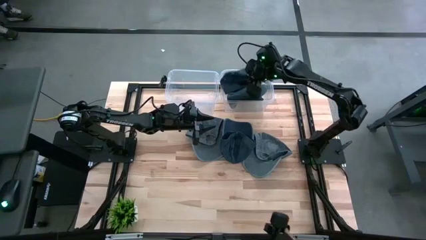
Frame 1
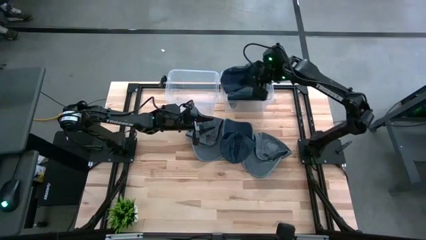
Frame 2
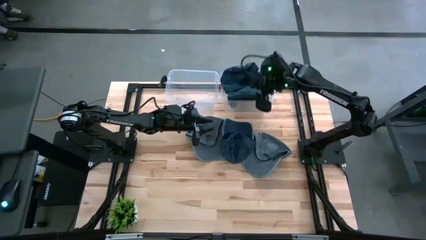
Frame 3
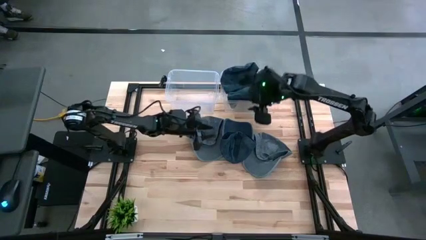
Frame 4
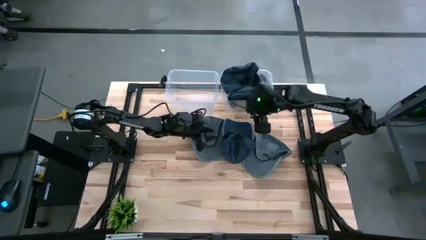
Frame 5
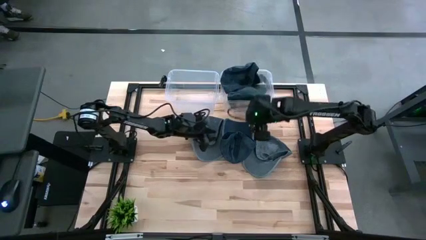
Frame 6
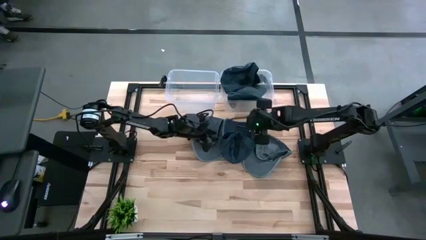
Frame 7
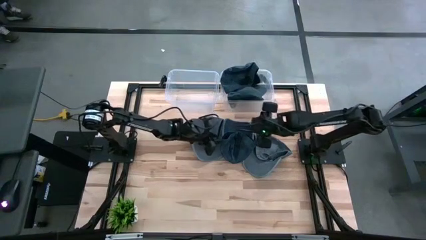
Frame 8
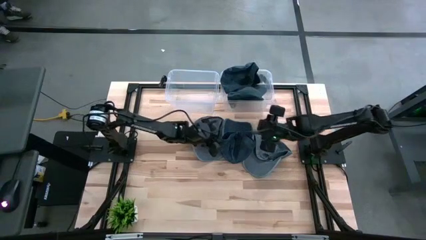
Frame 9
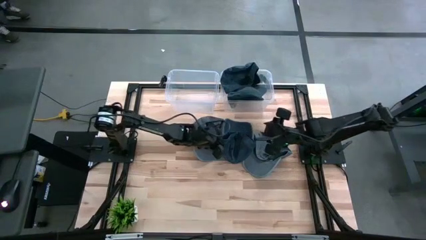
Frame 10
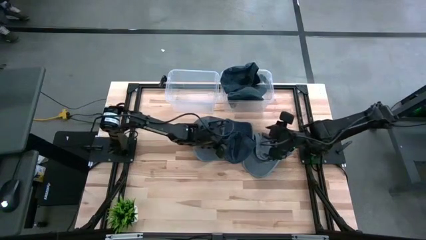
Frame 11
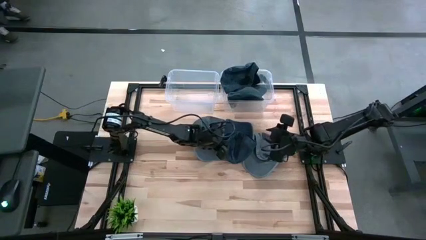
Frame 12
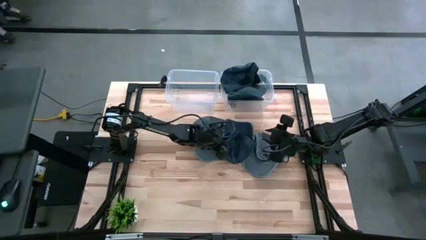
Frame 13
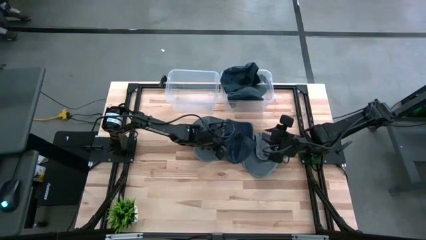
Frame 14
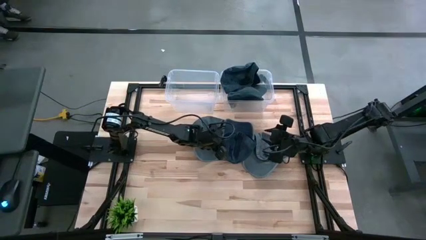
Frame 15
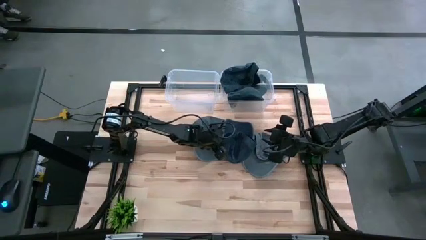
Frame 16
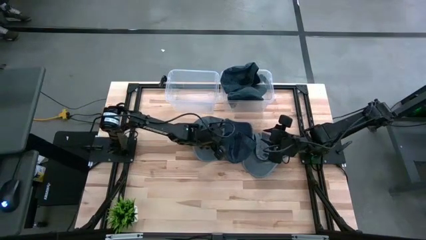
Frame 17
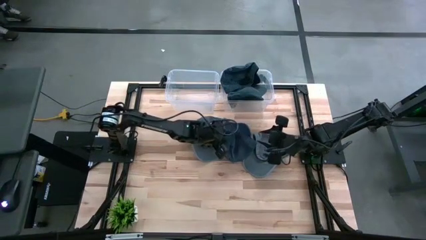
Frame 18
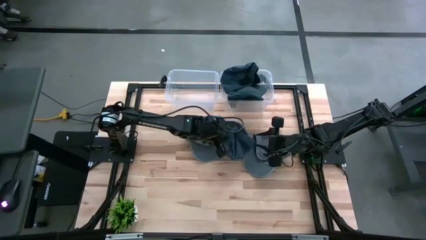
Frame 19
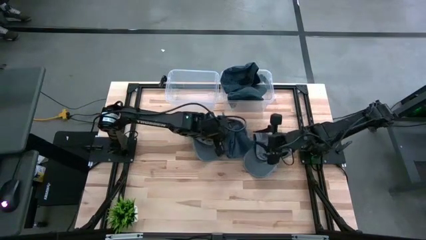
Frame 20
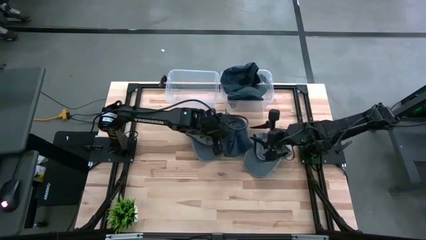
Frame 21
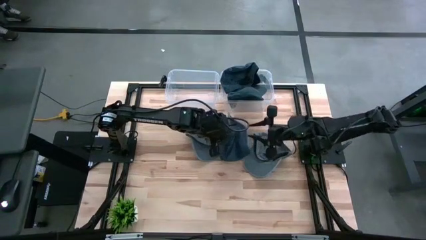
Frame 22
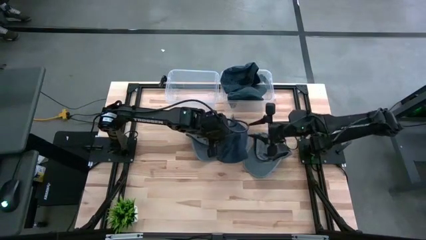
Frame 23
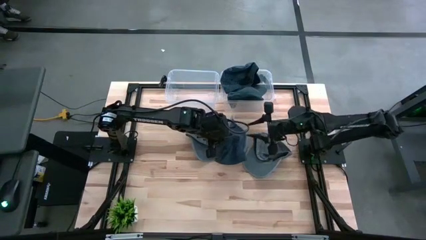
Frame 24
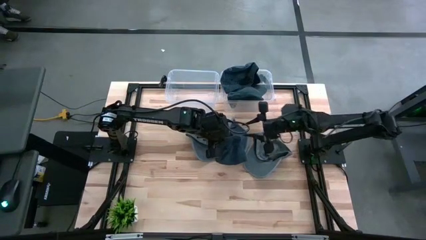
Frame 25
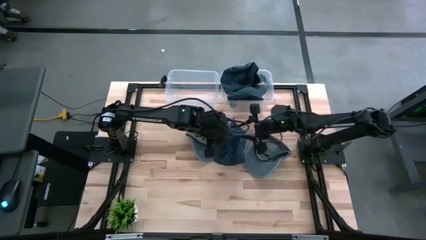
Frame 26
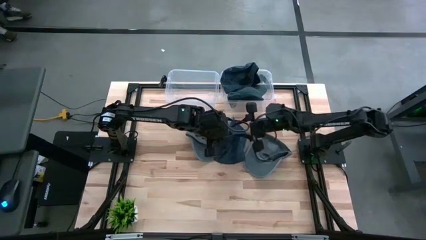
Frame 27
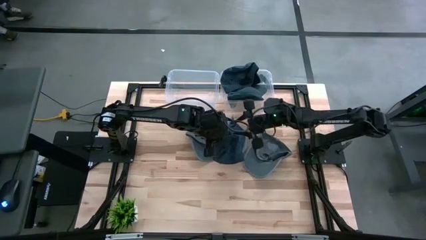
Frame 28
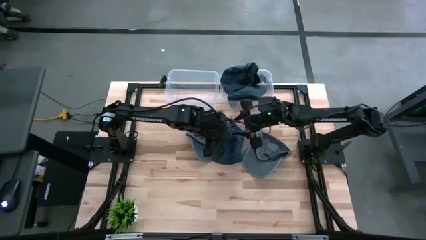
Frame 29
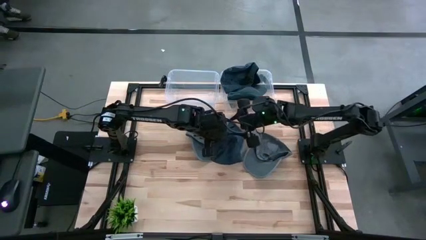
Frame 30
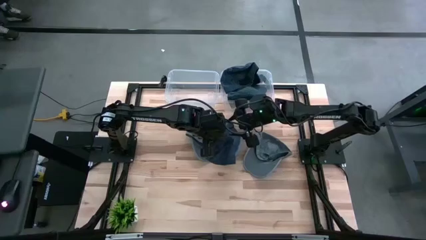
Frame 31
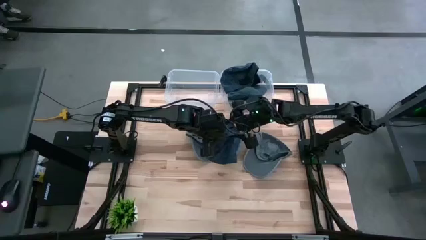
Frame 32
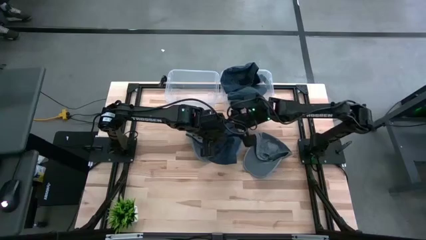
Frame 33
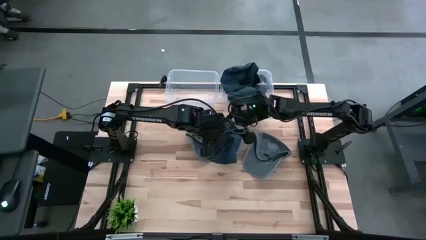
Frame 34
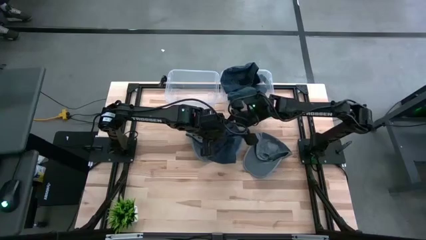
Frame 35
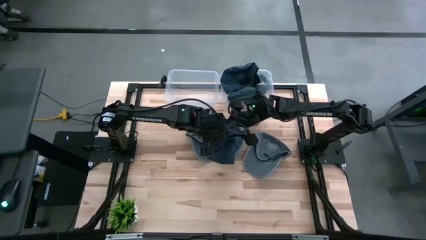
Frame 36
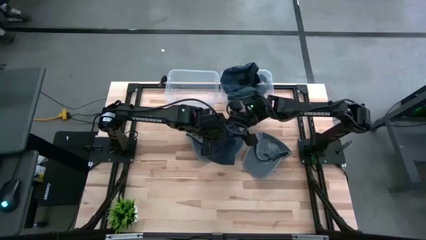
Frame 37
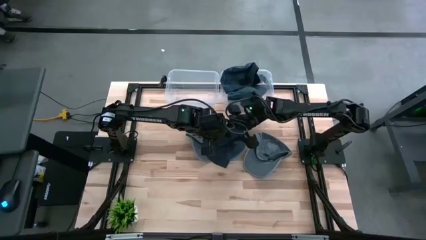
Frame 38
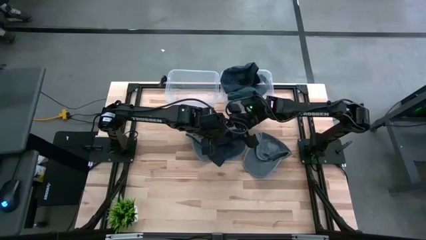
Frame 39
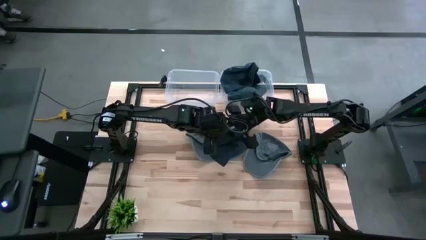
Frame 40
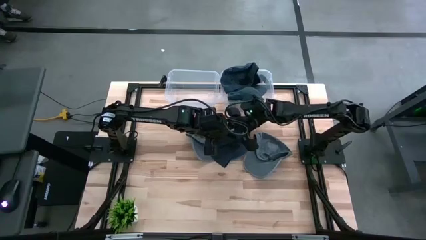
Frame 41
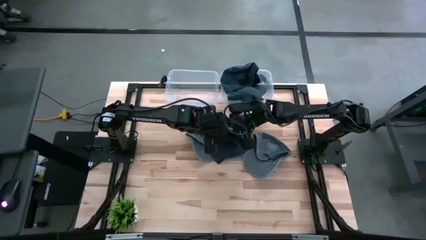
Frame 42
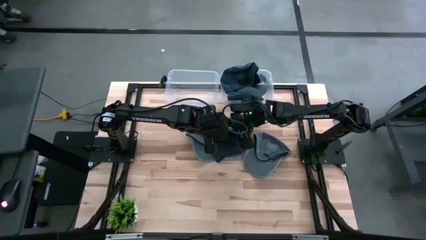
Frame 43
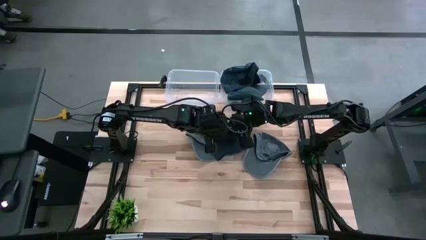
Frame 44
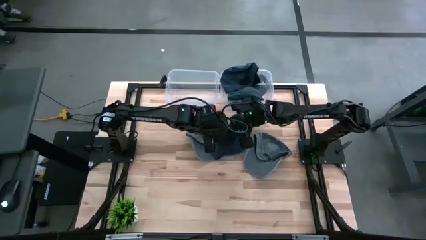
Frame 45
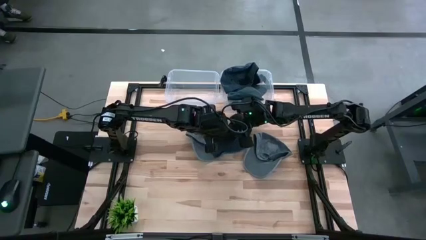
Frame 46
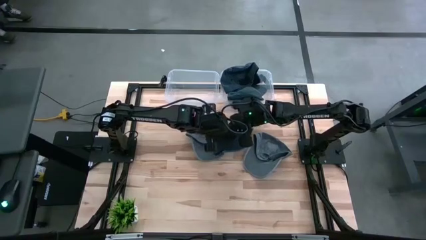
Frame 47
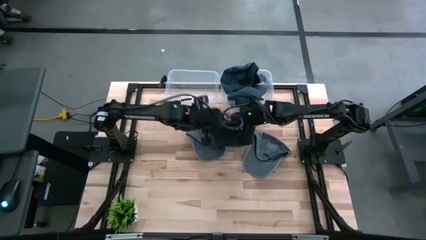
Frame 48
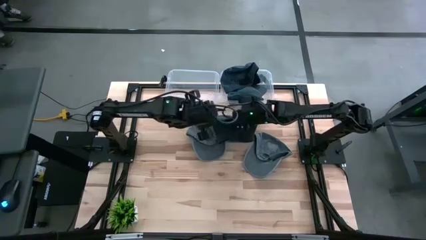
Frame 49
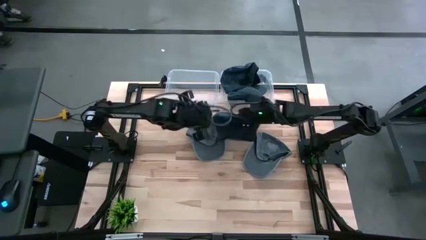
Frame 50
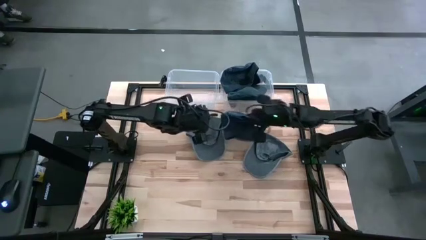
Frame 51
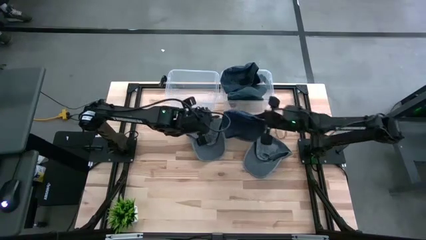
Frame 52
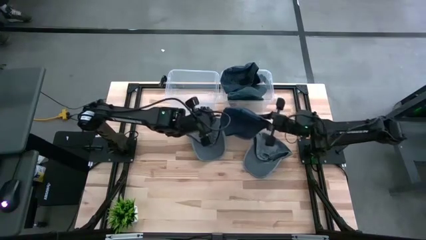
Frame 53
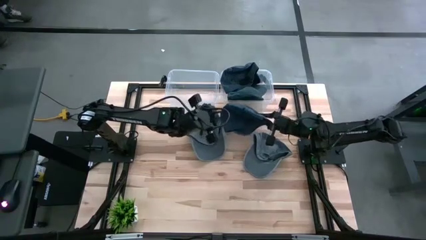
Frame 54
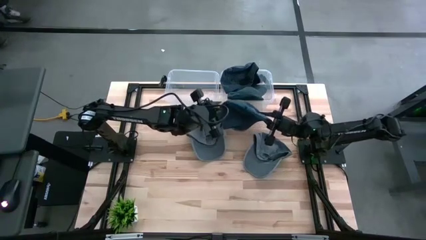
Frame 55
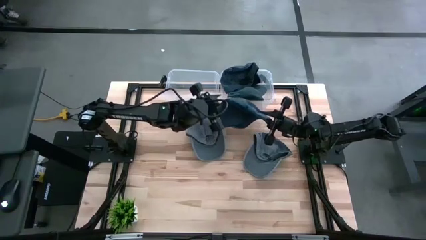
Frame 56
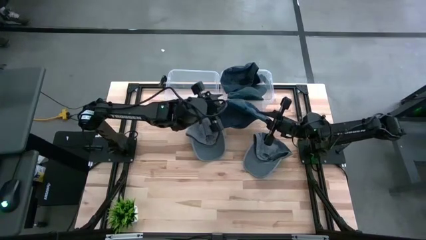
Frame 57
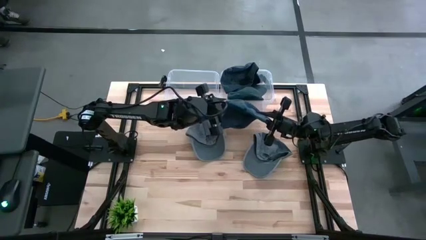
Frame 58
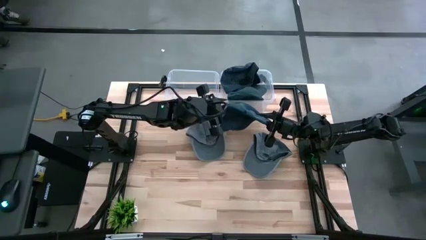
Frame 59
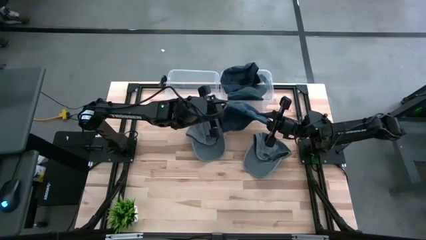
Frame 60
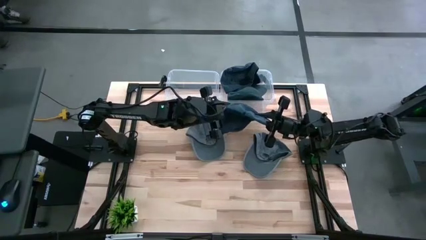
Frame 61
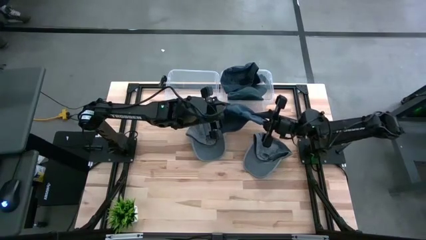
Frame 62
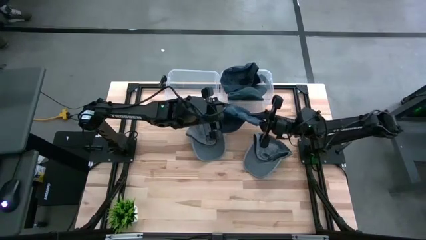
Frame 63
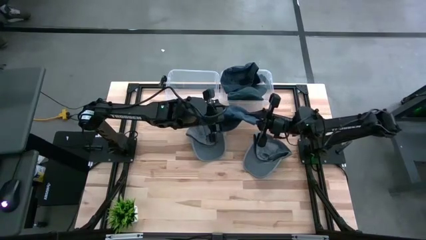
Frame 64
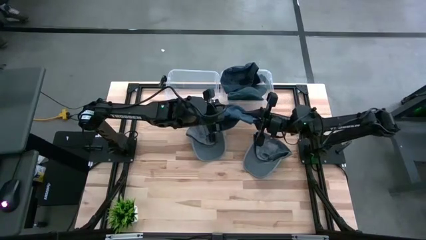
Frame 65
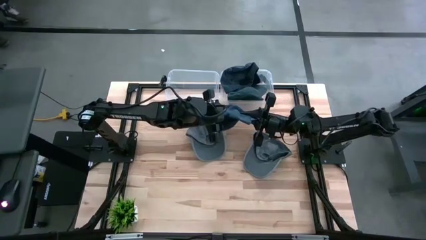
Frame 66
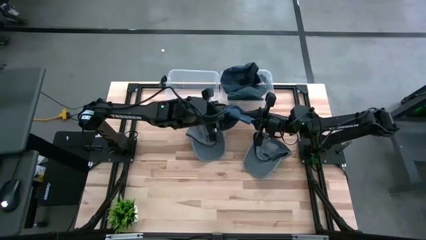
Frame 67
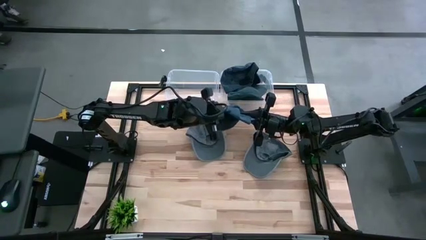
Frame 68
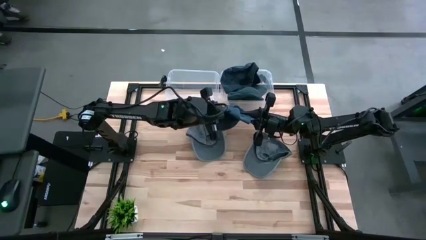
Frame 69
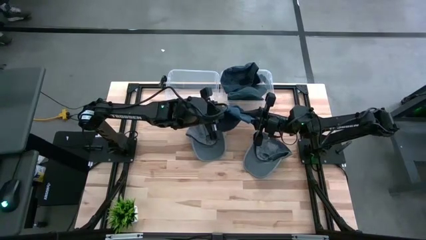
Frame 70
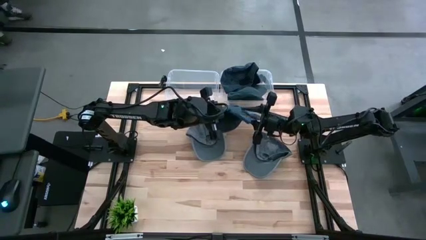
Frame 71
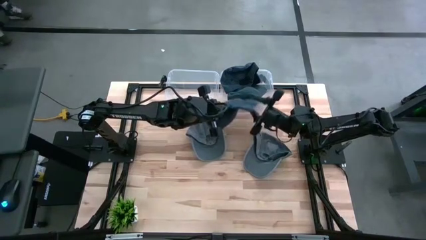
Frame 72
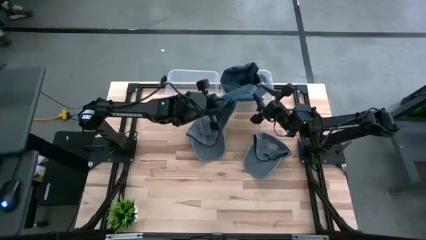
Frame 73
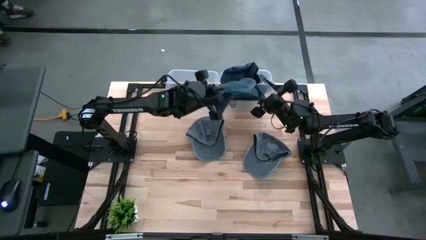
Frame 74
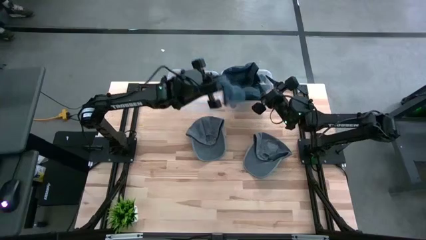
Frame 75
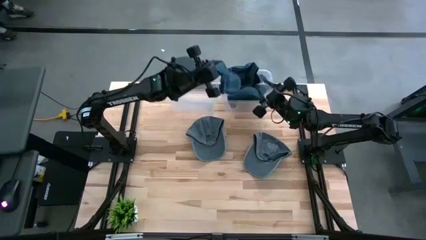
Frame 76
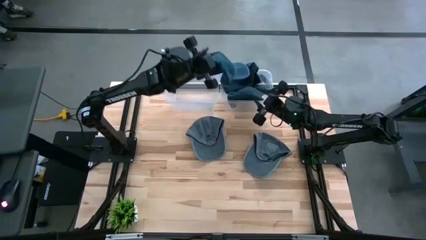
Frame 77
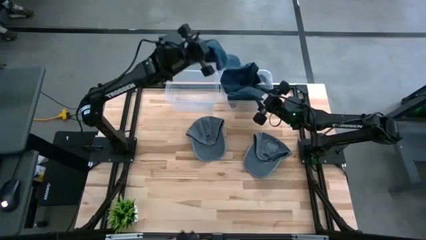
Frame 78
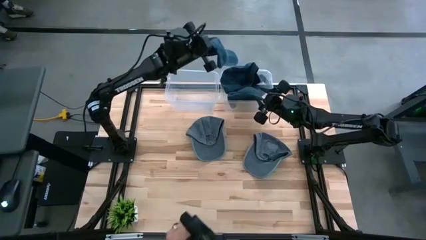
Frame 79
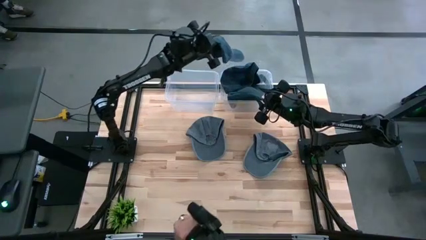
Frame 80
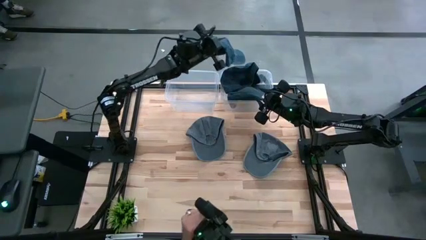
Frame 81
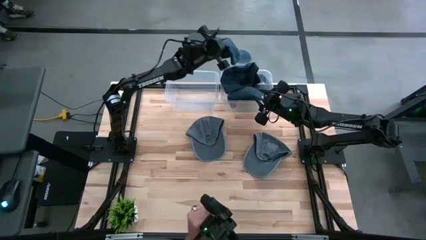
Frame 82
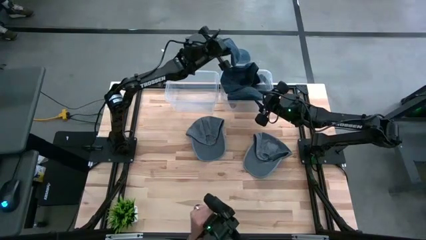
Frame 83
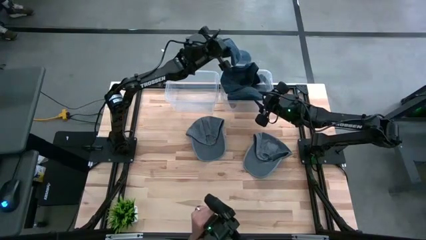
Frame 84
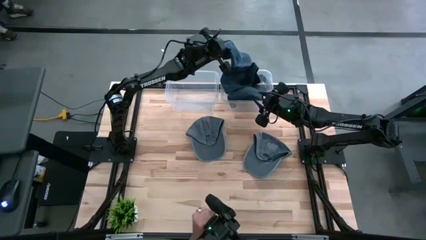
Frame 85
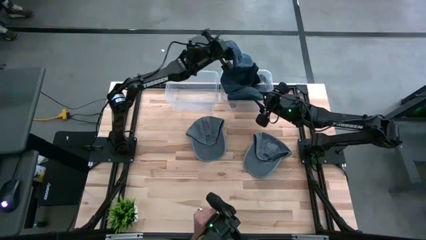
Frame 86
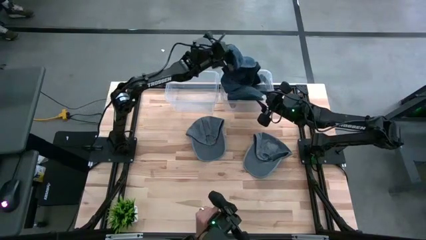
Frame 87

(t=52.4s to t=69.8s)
Task: Pick & Place hat
Put the blue cap into the right transparent bin
